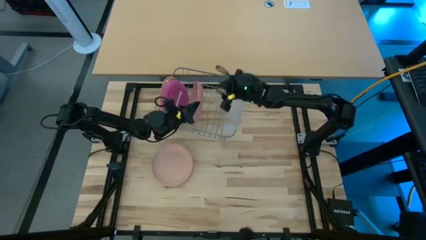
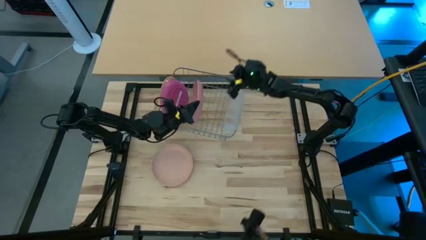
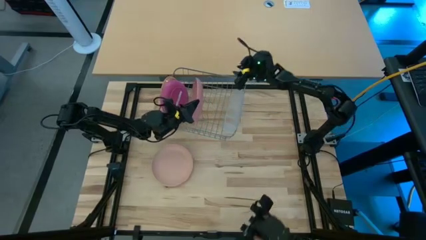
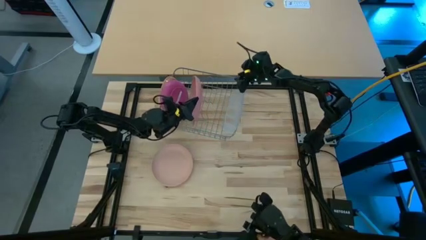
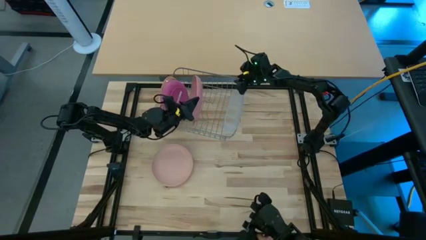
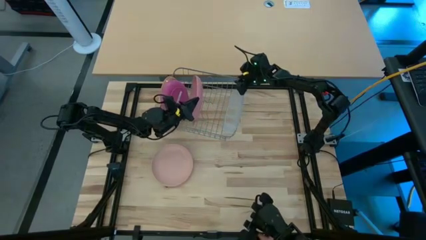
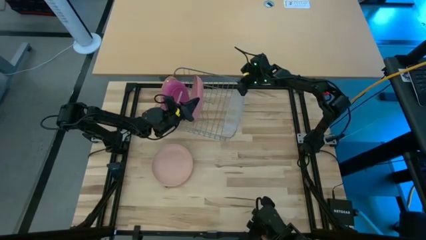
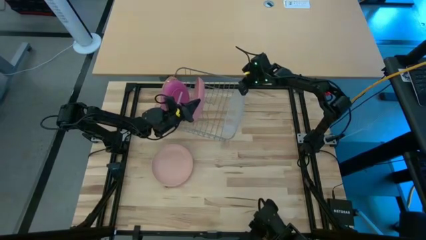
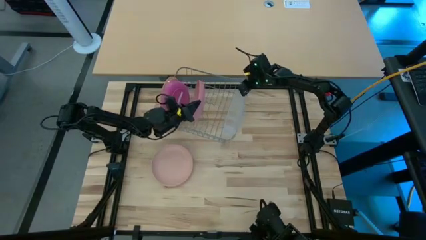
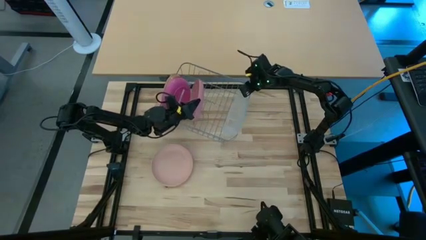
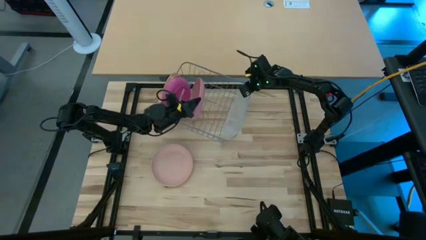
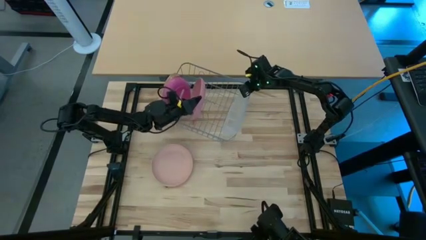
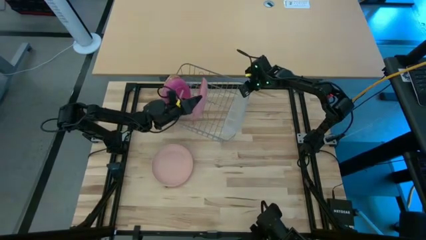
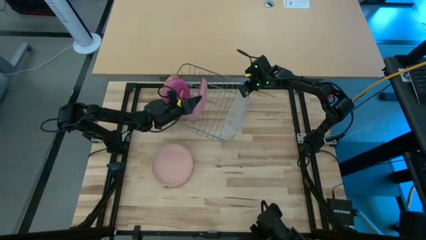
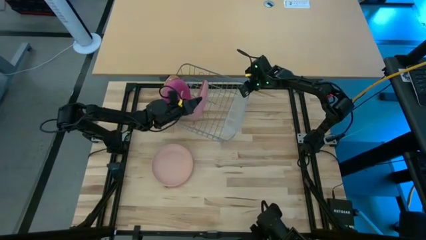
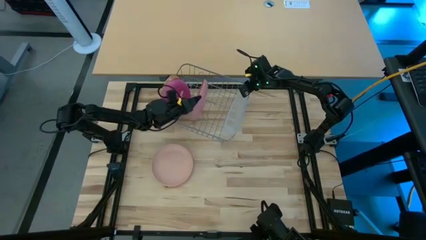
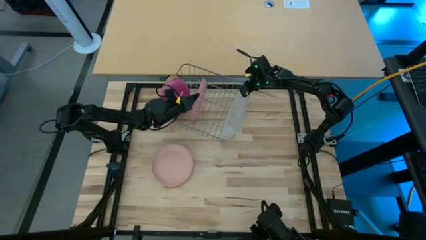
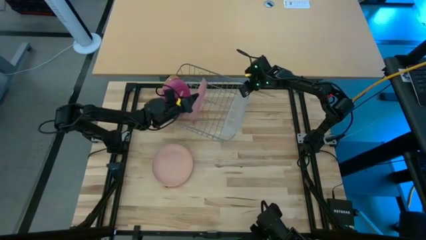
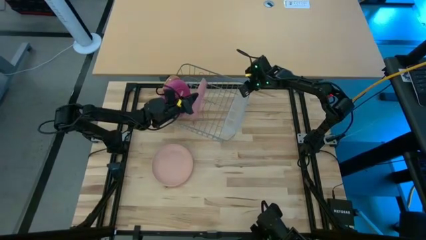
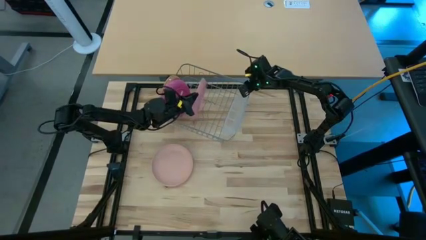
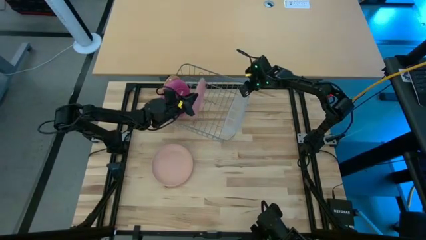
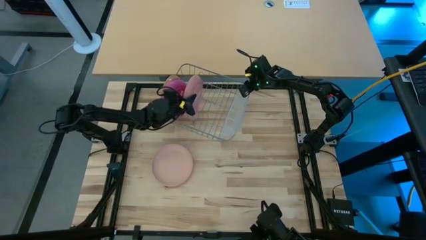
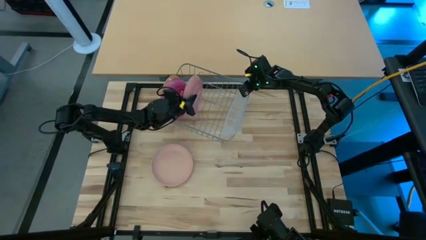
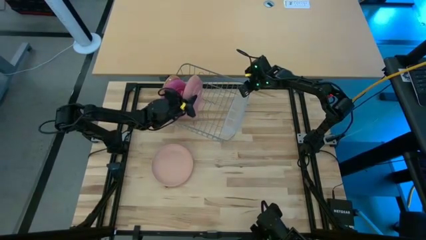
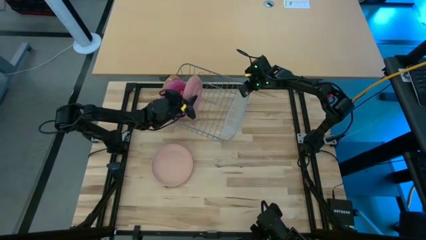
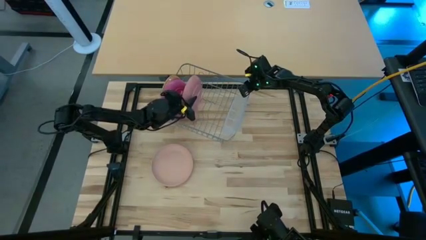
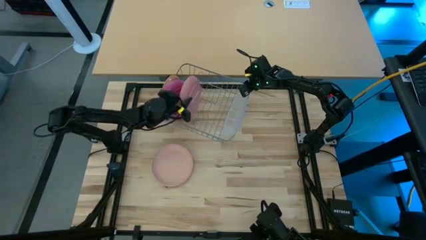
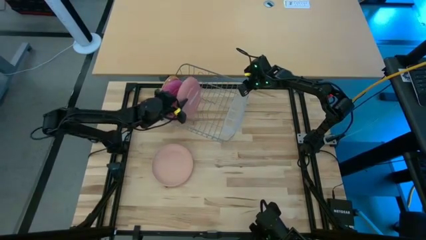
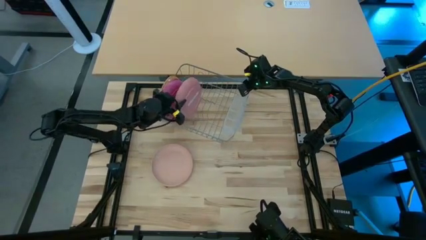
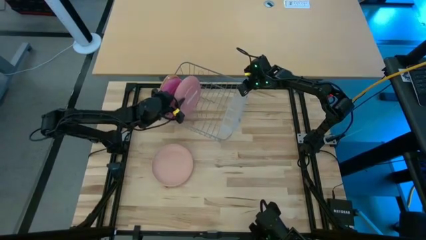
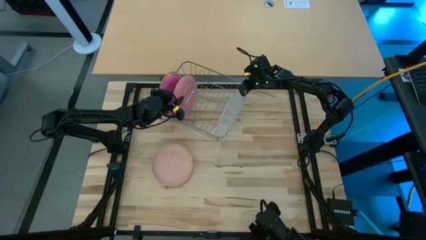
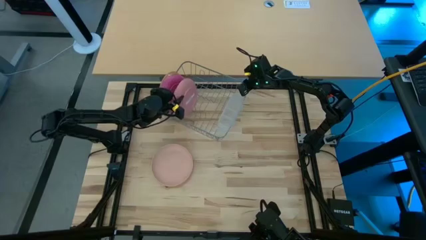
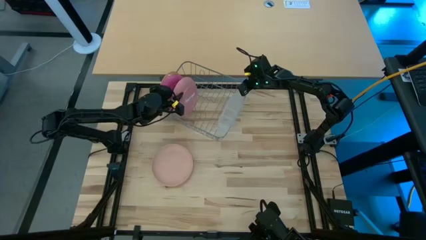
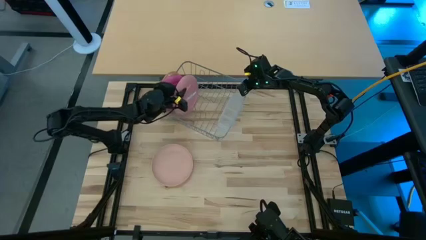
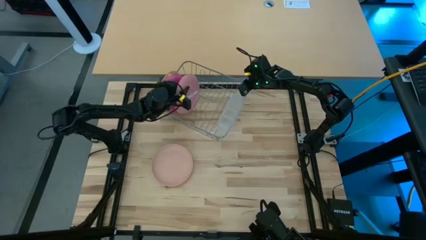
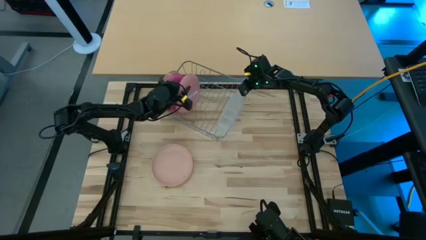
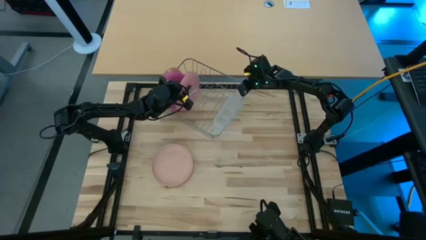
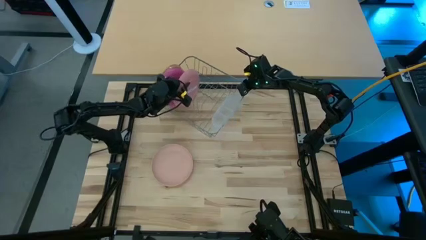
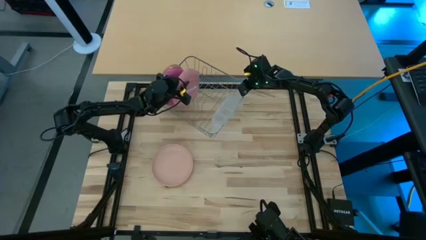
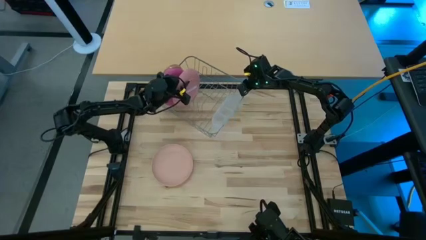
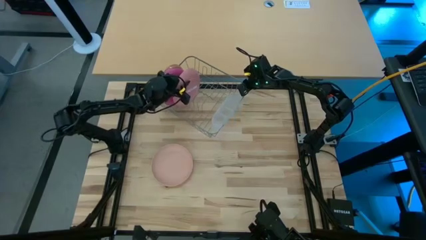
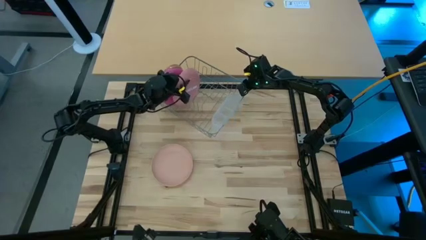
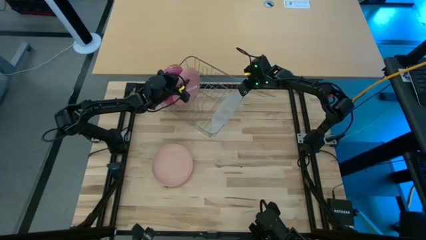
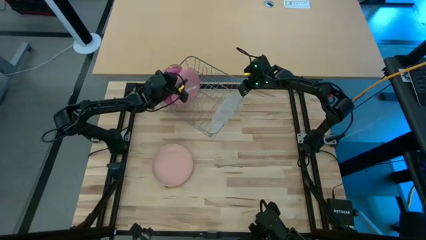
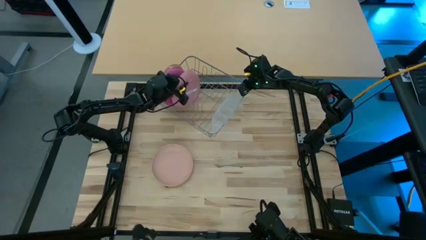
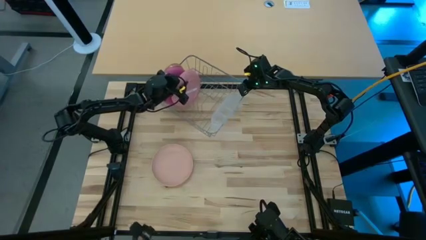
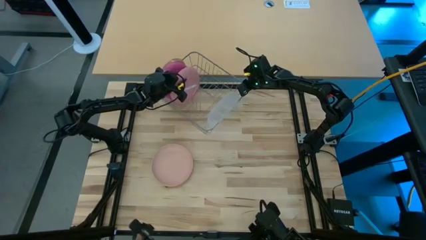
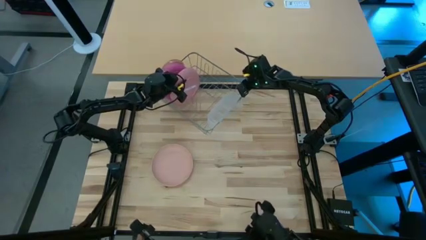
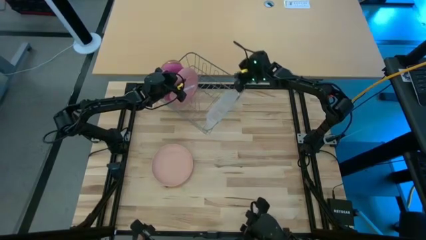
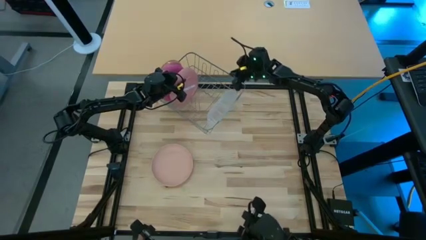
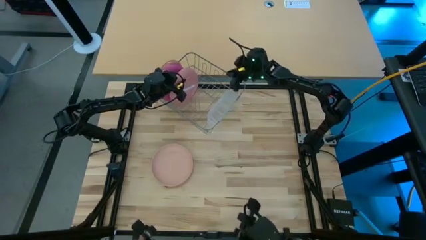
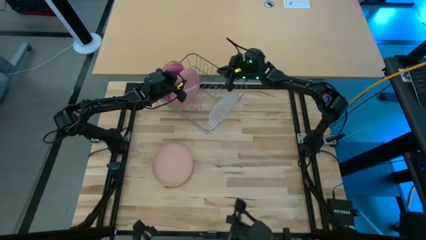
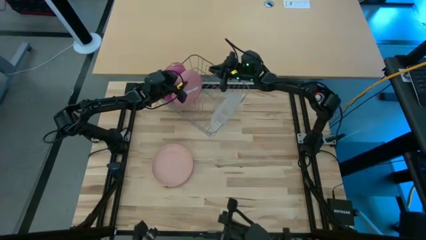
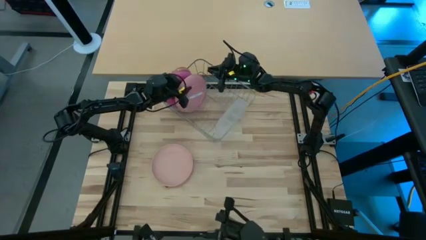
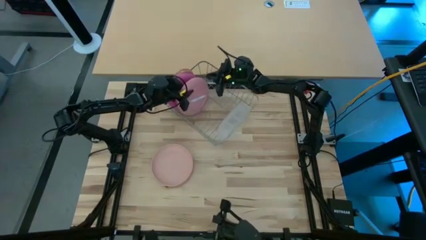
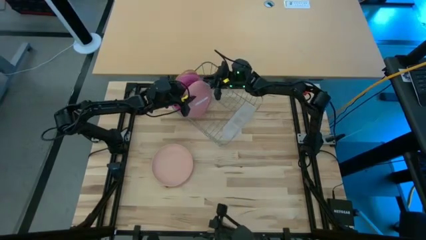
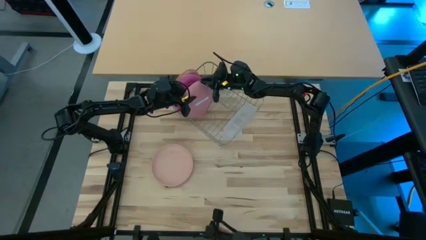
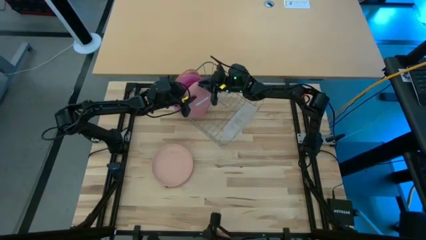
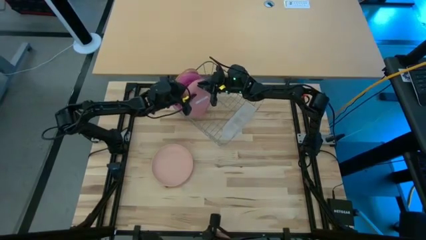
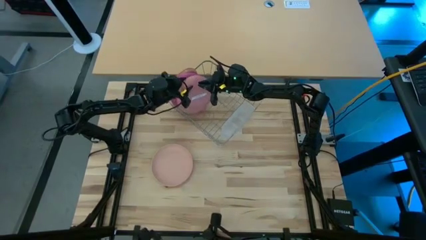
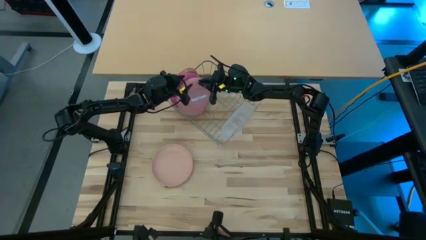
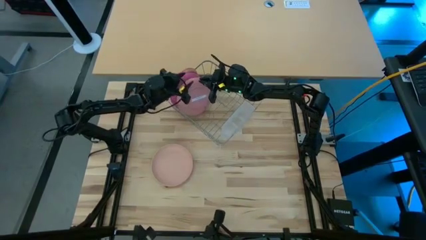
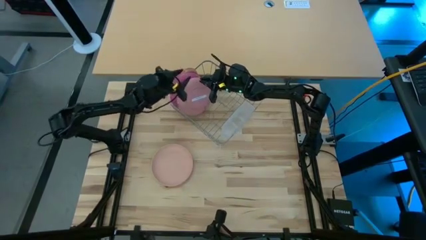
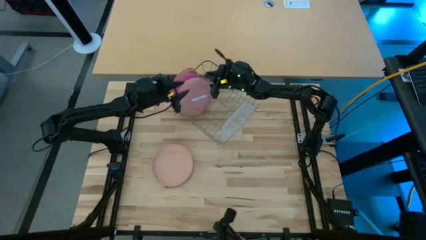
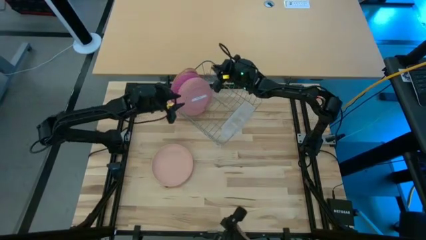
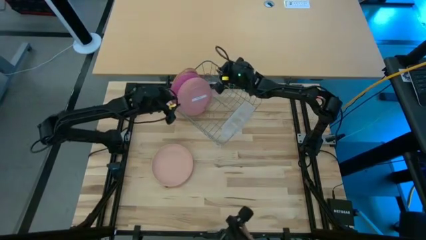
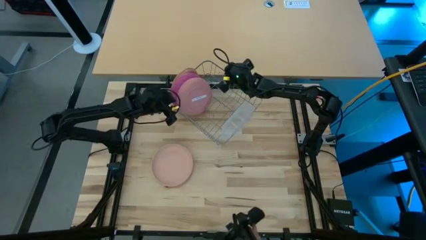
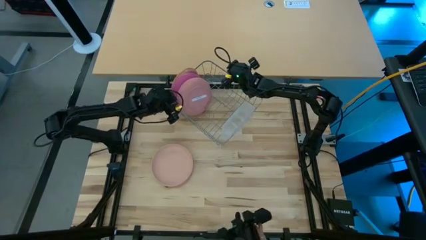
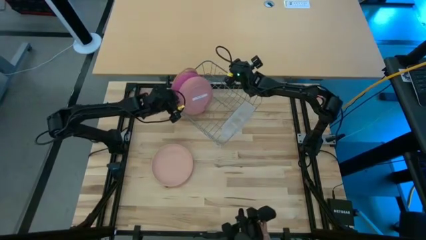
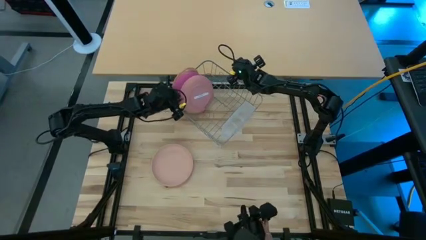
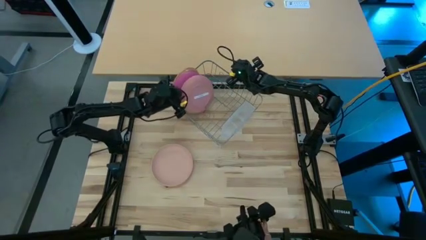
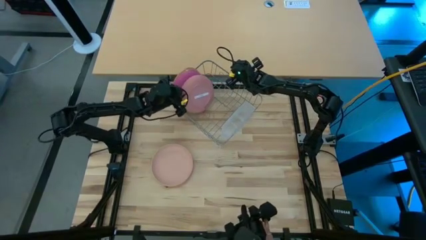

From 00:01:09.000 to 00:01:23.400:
Task: Sort dishes
Put the pink plate into the dish rack

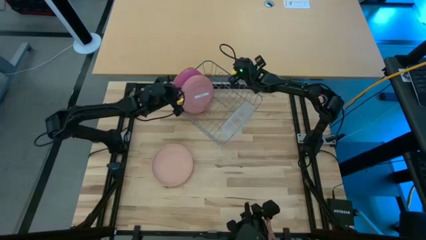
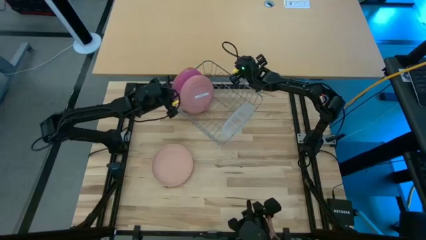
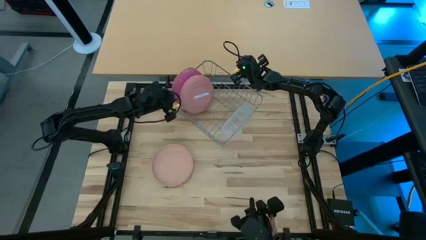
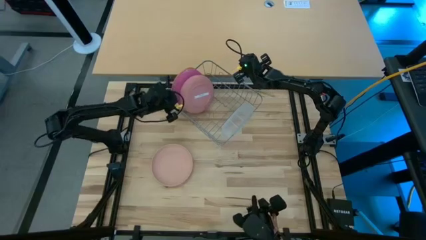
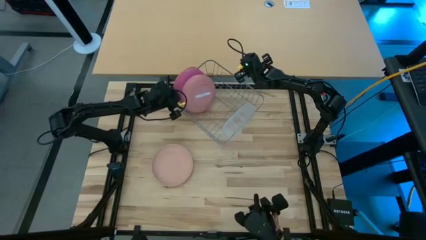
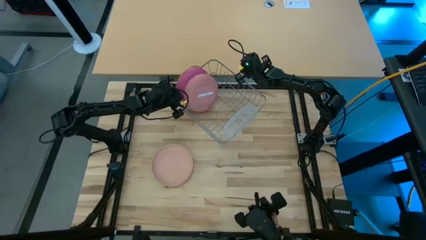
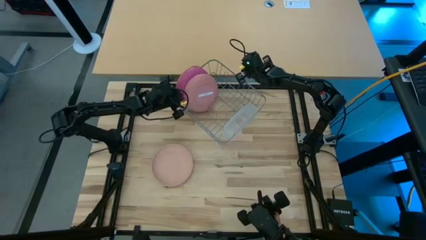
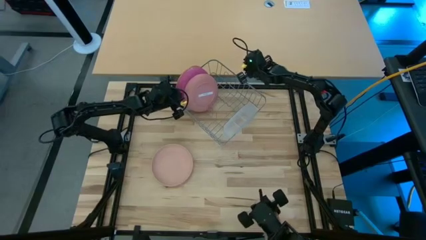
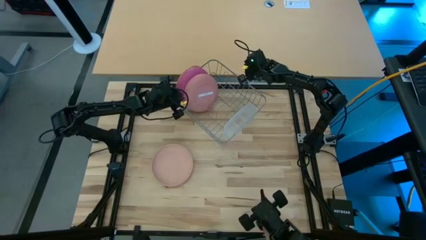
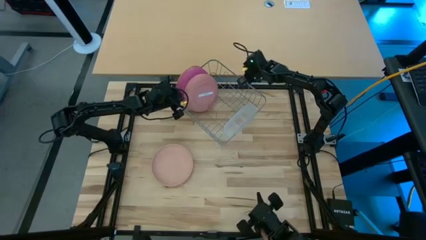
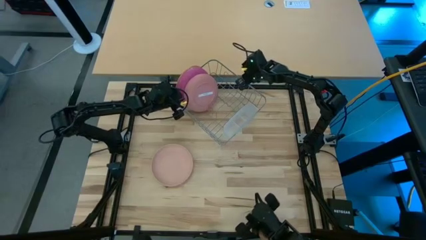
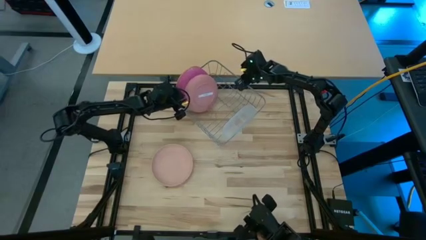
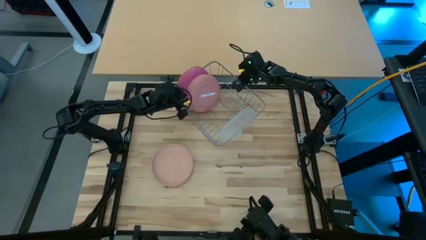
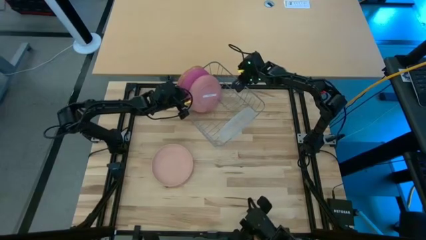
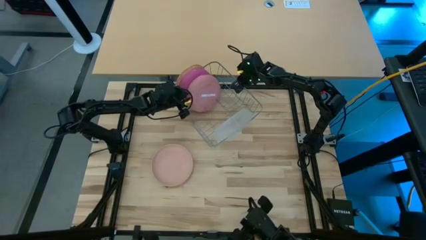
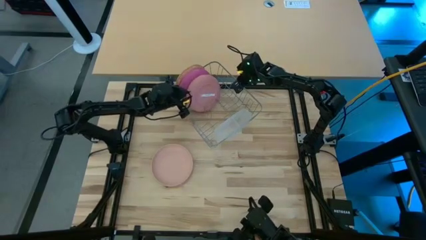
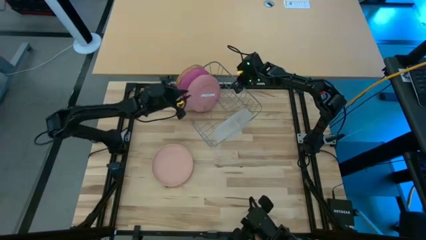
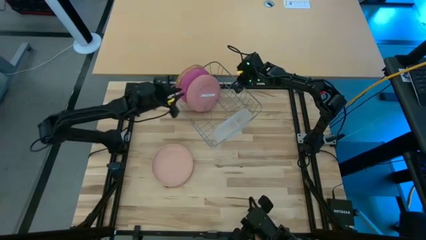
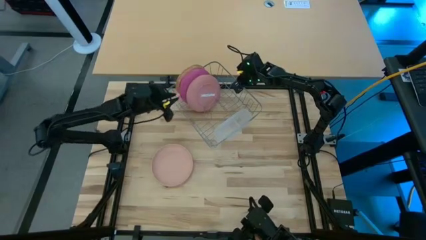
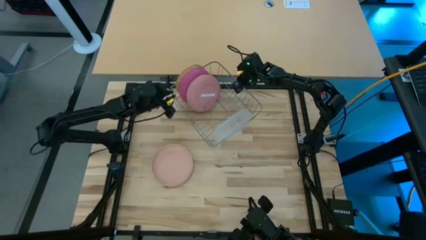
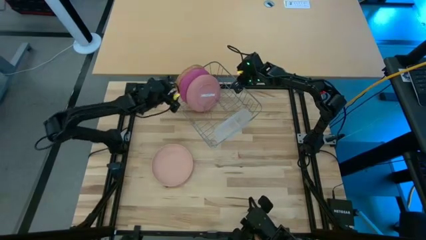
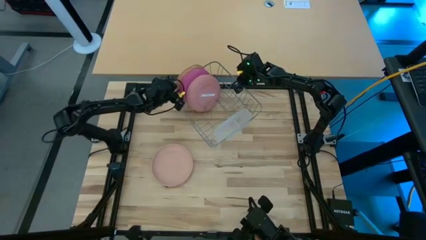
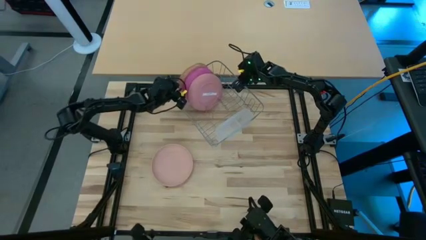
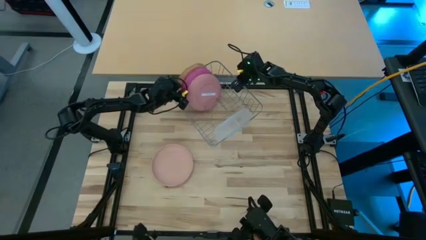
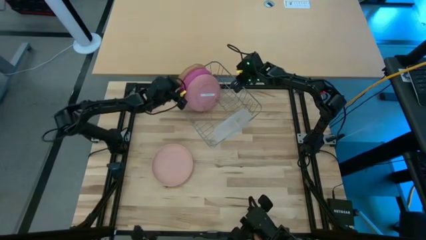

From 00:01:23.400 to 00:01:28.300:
Adjust the colored plates
